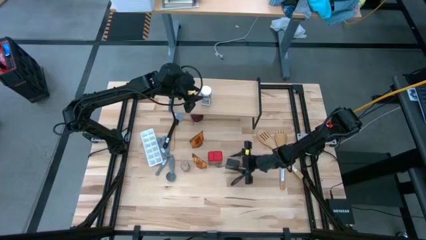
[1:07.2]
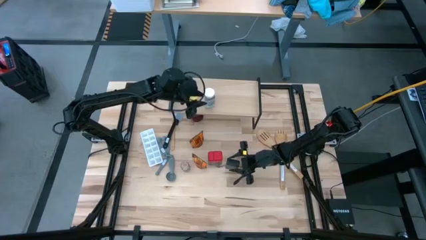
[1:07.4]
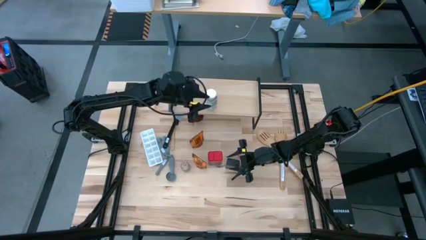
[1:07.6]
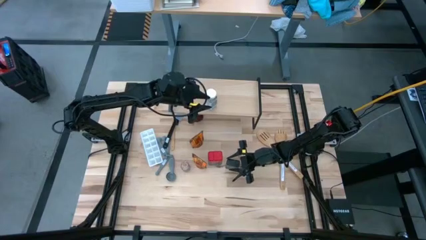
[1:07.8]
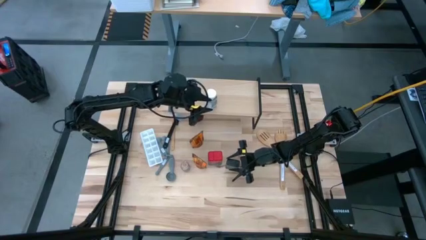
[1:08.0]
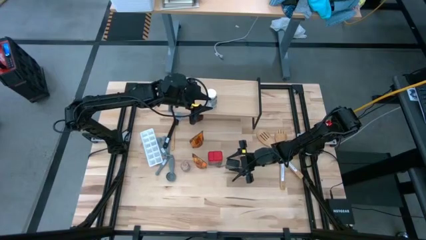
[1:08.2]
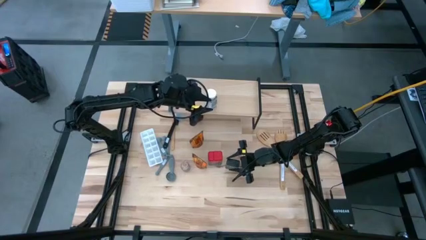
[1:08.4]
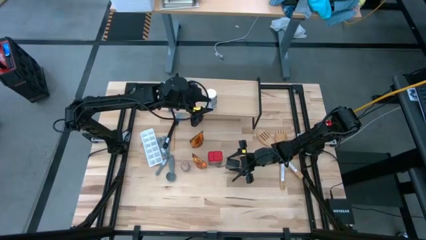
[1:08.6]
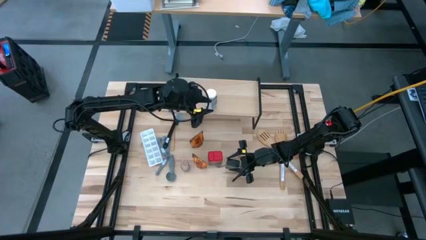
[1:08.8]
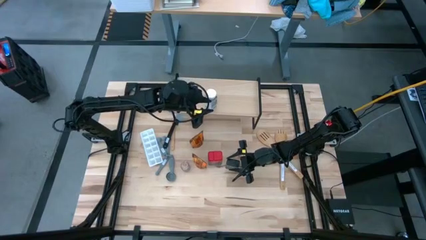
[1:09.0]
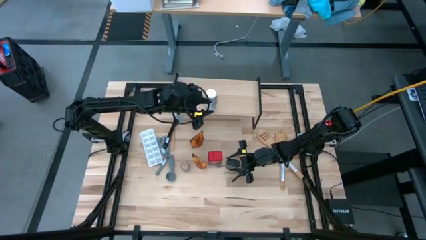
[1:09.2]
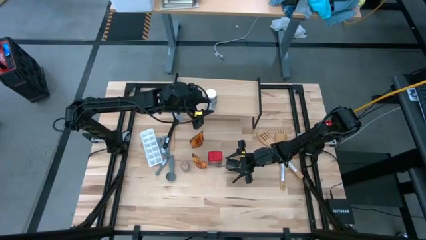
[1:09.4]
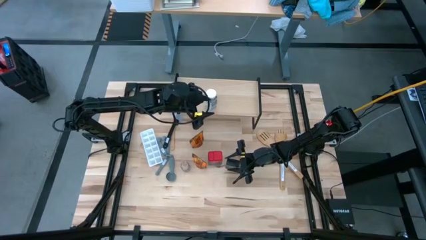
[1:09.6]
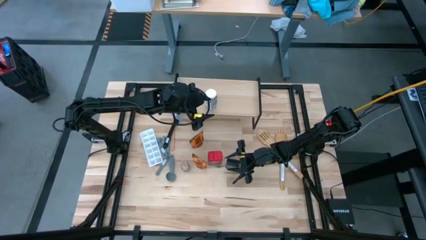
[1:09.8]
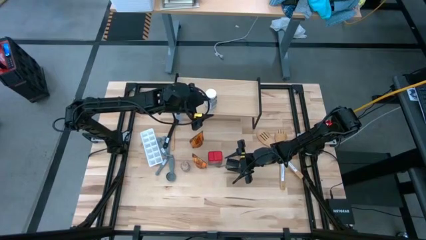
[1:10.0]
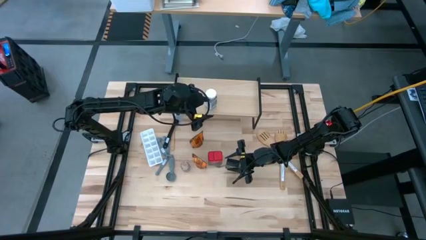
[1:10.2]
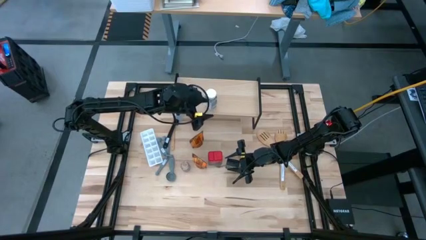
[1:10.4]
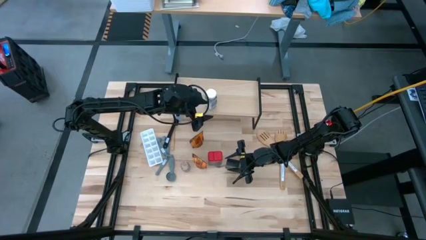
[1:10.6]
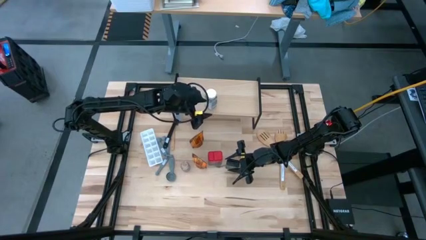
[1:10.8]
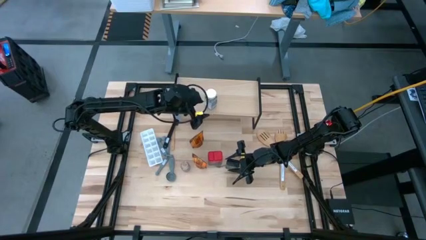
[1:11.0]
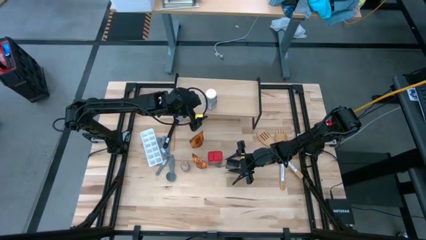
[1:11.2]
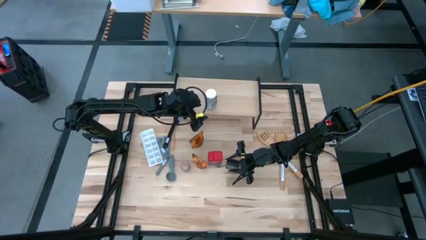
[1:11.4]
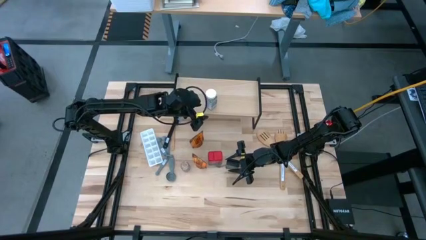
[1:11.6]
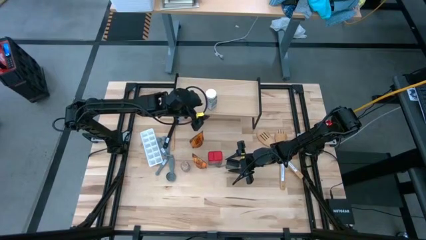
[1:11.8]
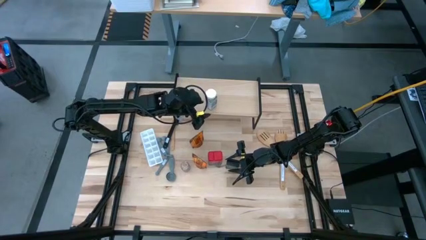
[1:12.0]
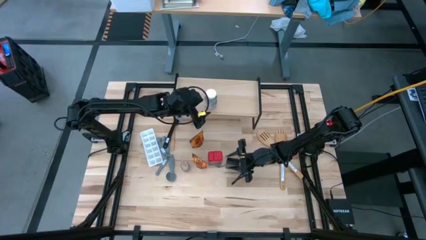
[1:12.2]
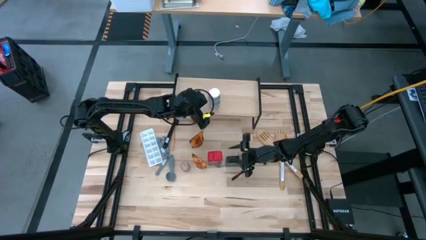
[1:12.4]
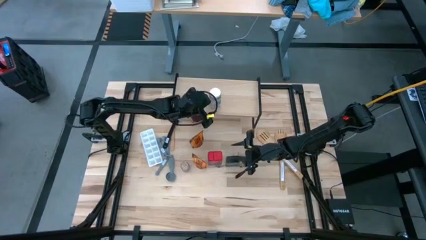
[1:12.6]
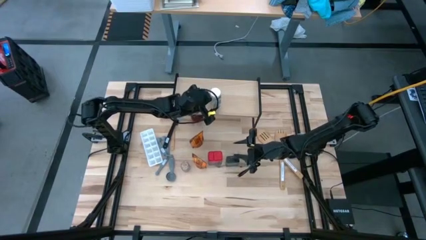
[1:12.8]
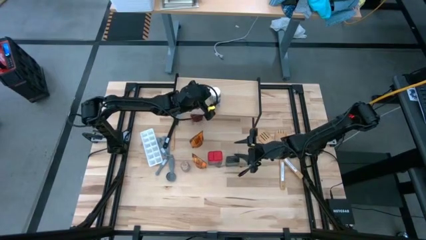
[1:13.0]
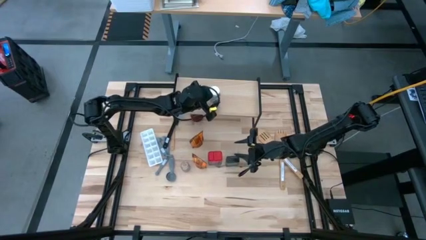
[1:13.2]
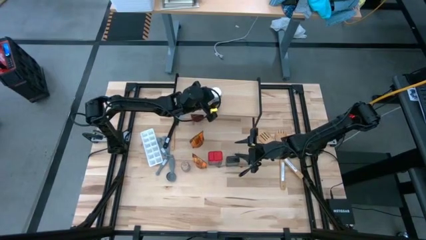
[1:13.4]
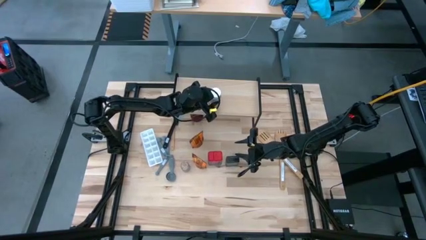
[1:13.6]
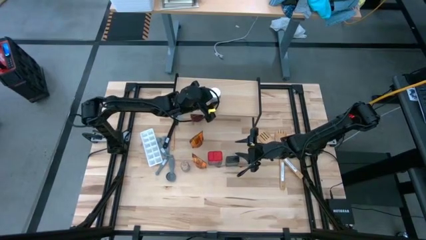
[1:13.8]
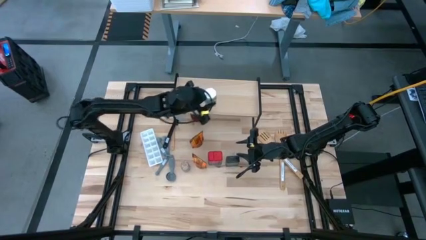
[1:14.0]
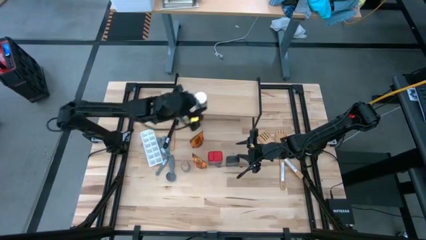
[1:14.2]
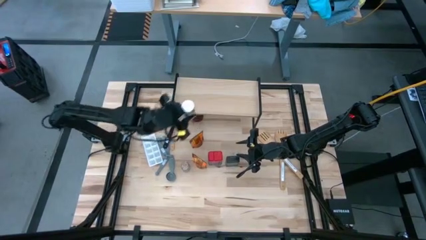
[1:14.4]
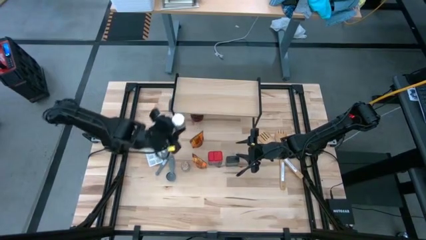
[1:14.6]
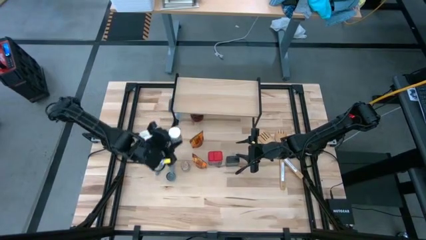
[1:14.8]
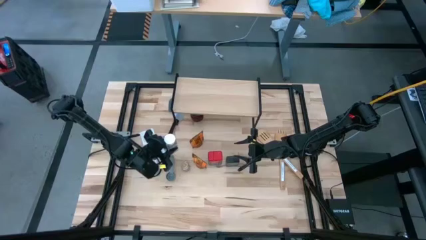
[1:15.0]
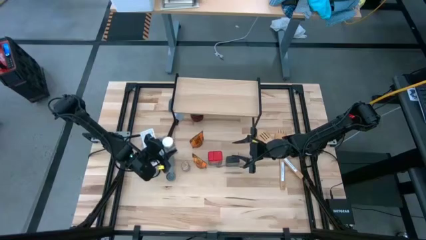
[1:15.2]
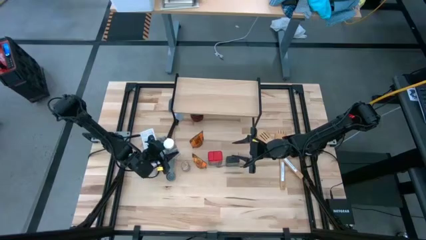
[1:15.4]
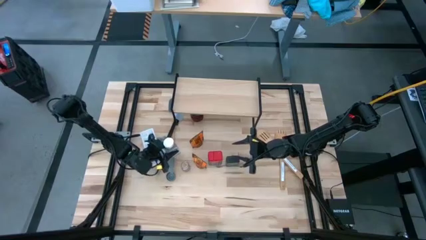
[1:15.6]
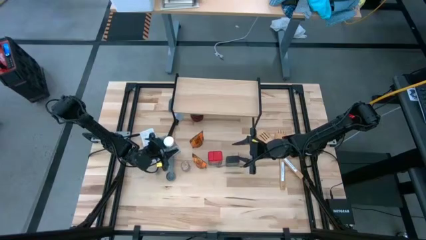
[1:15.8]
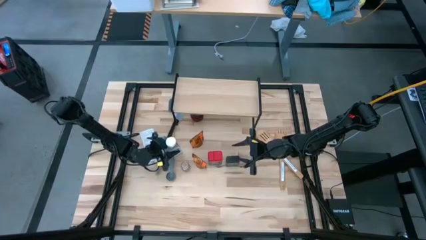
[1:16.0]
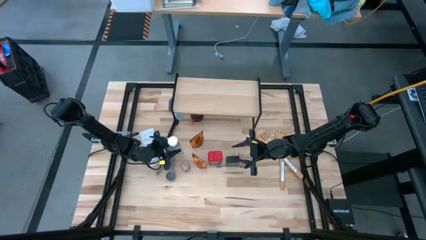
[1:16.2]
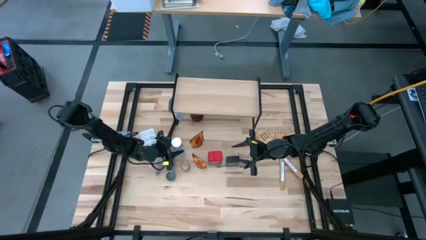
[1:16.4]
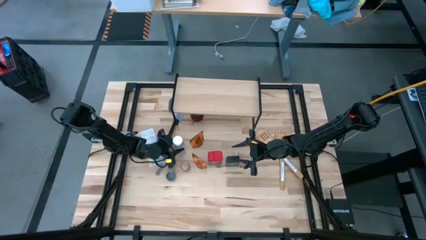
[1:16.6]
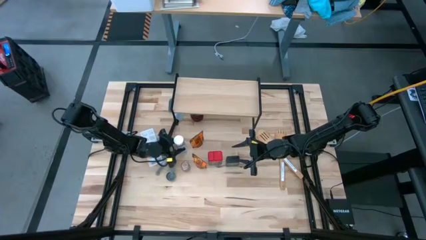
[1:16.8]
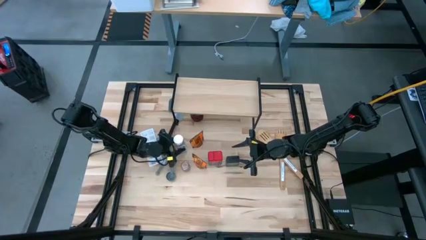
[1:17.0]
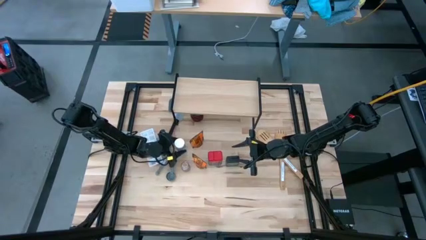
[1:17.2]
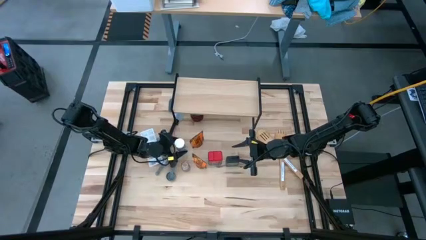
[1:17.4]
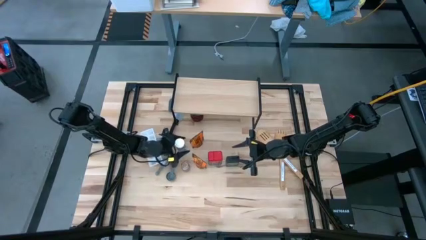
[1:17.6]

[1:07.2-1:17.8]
Task: Shelf spices
Remove the white seasoning bottle from the shelf

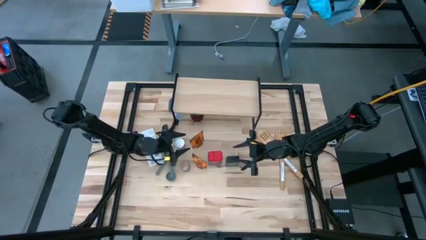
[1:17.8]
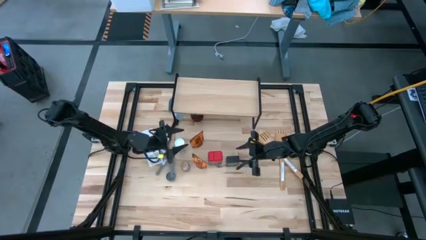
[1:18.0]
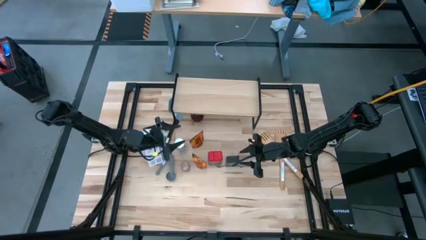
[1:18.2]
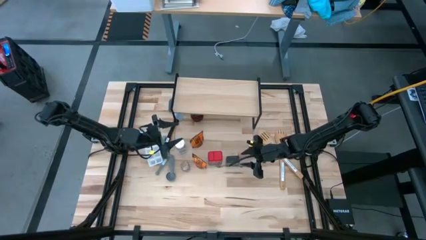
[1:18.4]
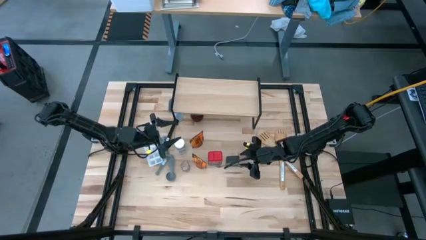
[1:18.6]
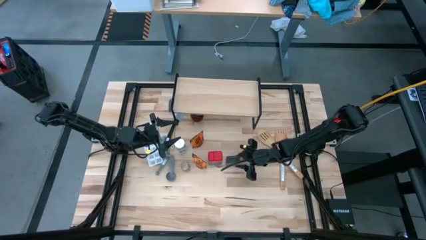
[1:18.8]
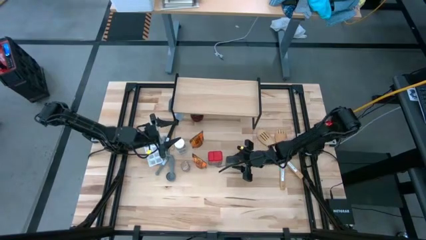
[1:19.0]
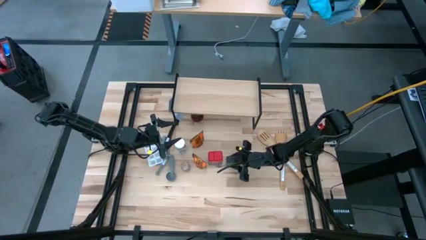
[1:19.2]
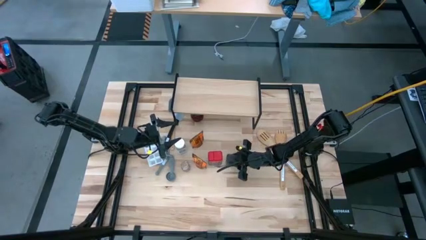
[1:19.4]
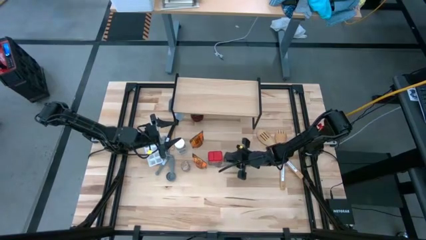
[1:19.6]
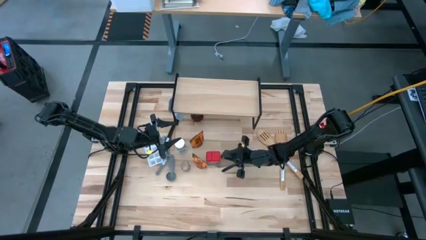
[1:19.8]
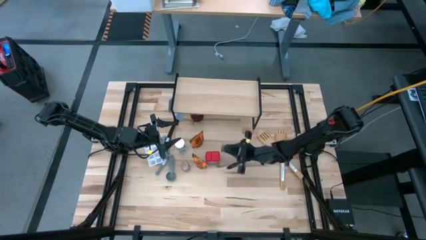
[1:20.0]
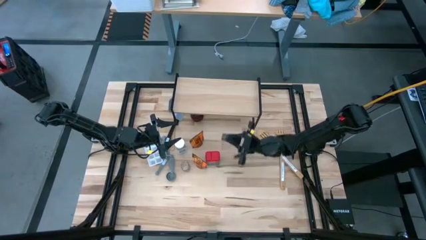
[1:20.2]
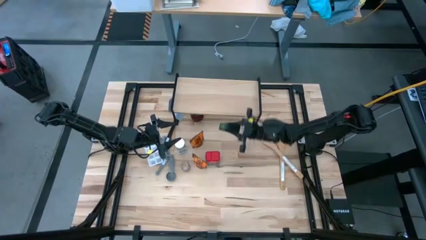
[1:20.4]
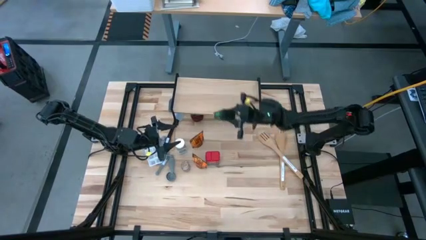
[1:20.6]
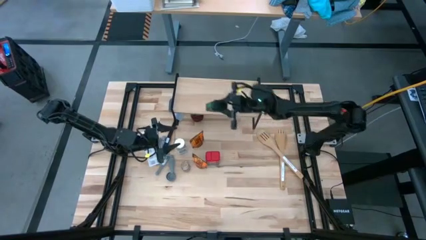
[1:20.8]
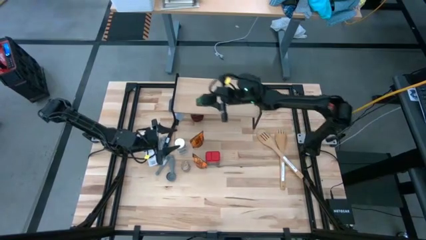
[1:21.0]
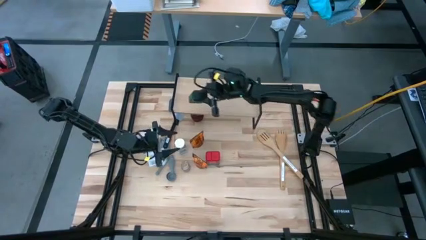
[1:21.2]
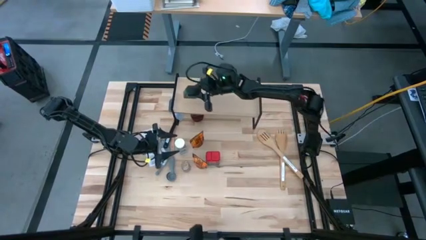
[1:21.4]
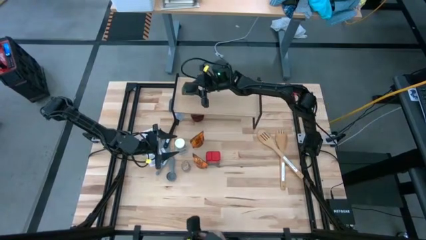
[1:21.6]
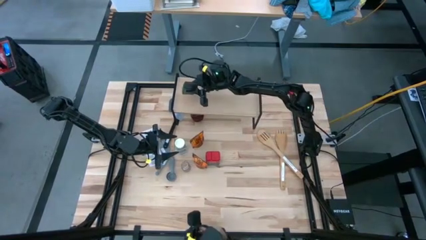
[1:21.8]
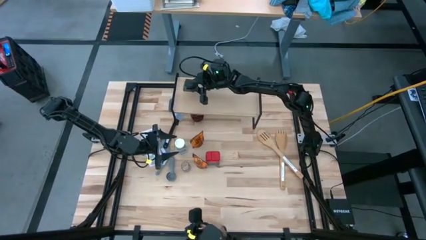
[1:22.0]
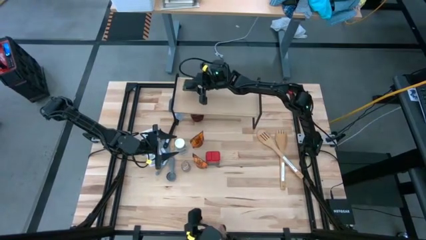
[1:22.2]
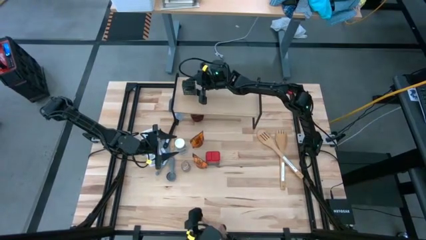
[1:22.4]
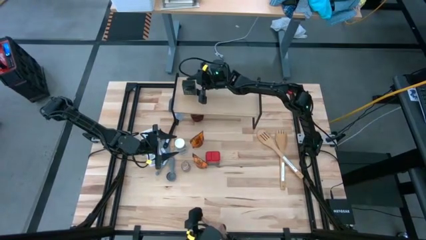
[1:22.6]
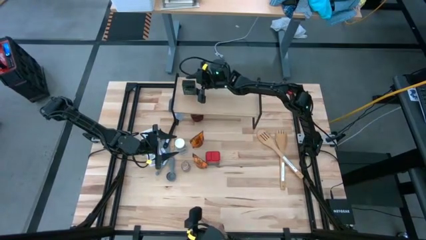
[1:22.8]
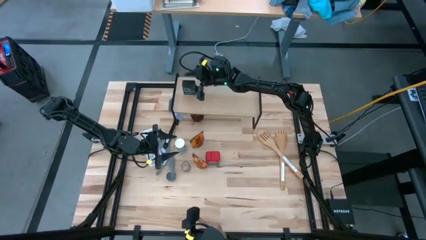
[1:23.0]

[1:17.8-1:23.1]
Put the green seasoning can on the shelf
